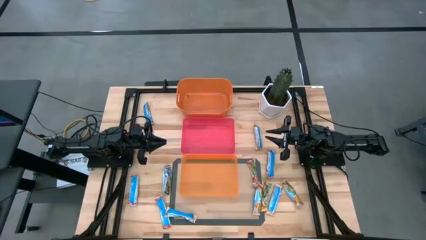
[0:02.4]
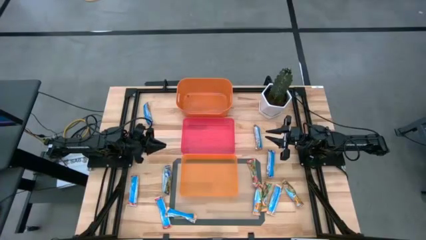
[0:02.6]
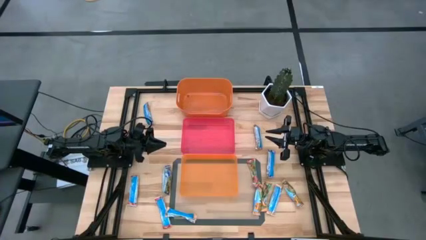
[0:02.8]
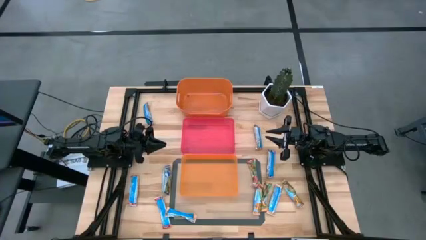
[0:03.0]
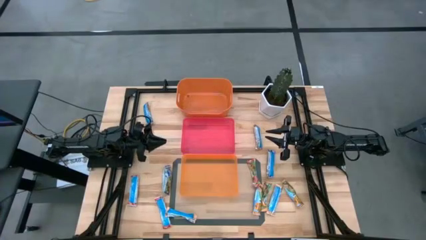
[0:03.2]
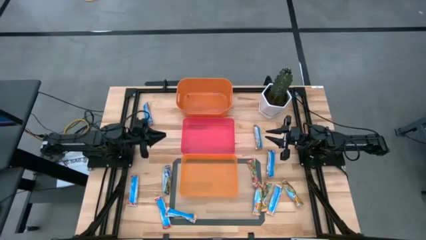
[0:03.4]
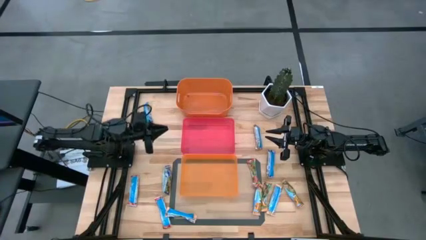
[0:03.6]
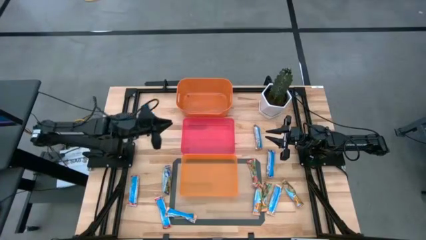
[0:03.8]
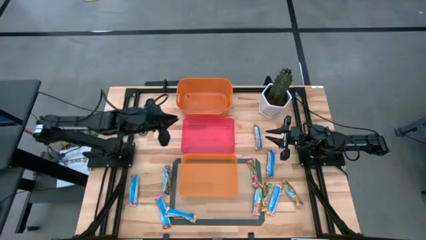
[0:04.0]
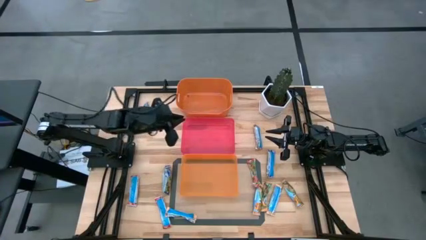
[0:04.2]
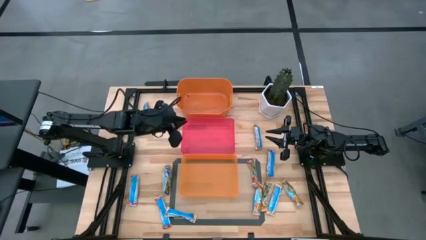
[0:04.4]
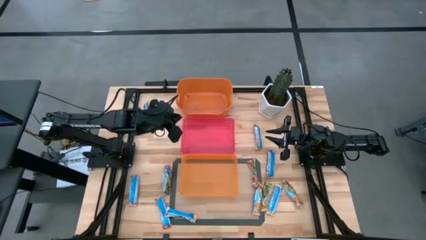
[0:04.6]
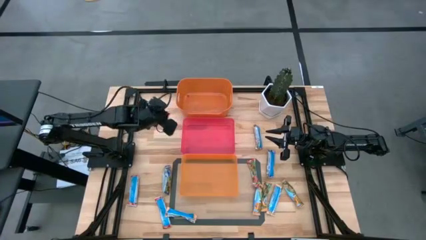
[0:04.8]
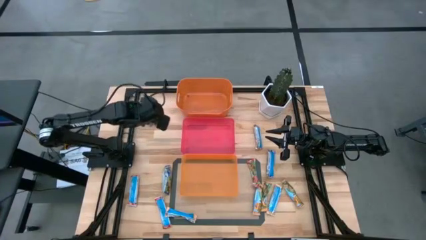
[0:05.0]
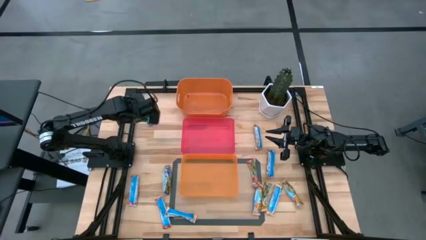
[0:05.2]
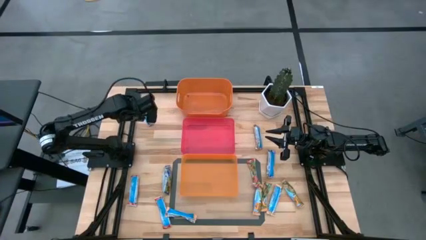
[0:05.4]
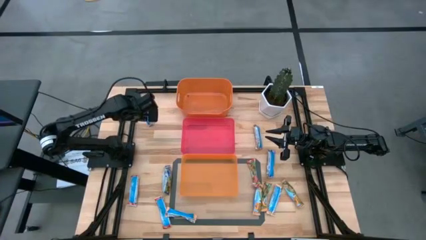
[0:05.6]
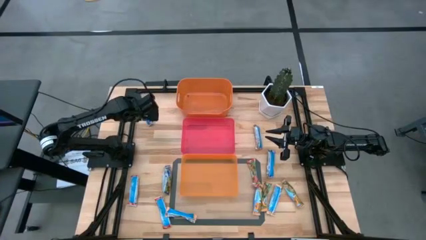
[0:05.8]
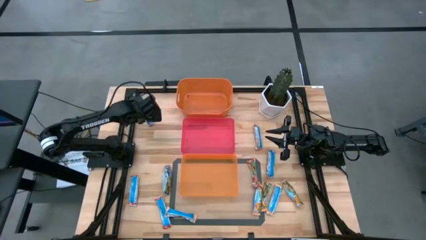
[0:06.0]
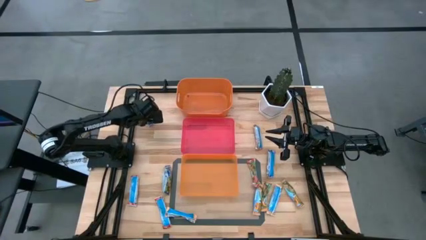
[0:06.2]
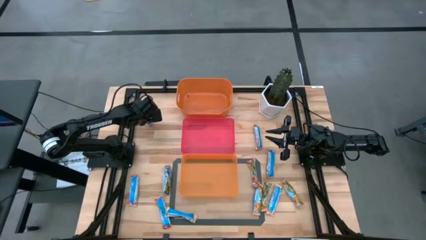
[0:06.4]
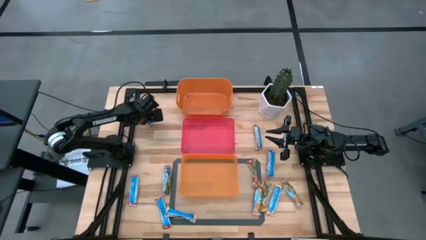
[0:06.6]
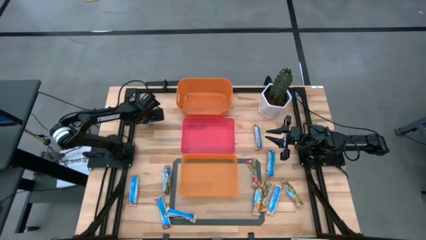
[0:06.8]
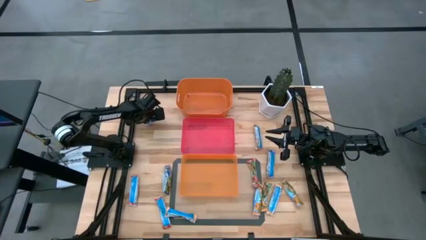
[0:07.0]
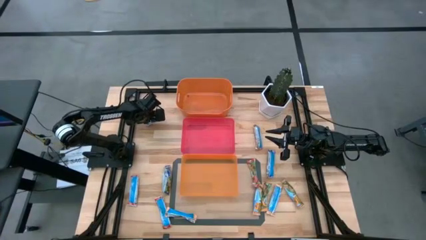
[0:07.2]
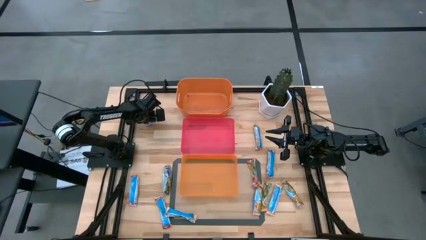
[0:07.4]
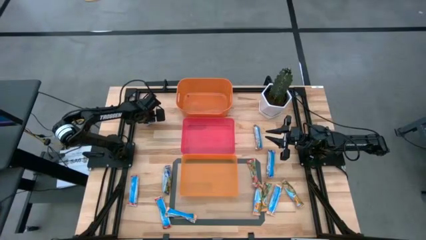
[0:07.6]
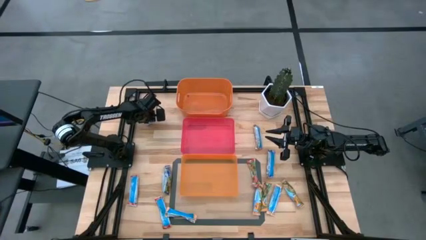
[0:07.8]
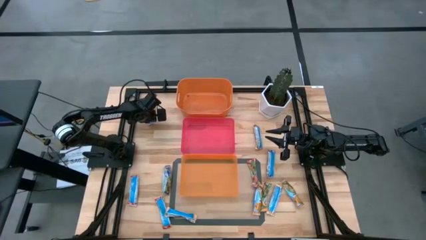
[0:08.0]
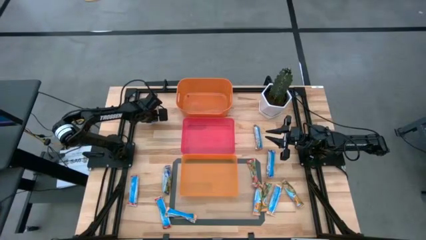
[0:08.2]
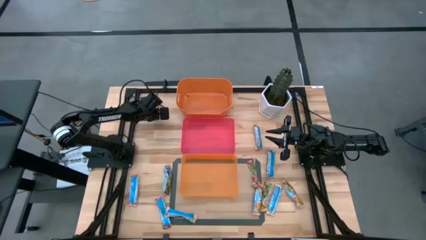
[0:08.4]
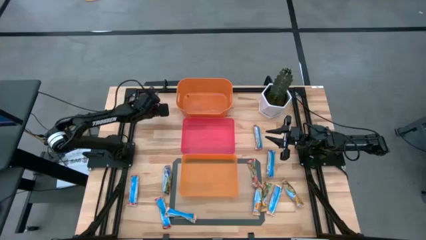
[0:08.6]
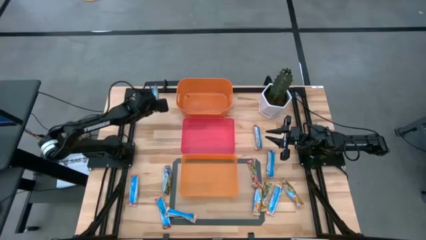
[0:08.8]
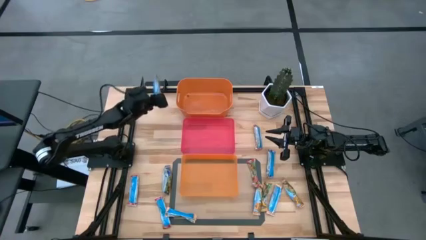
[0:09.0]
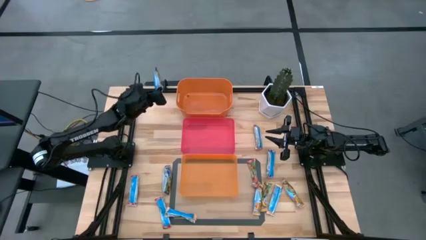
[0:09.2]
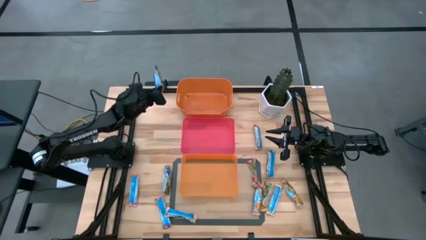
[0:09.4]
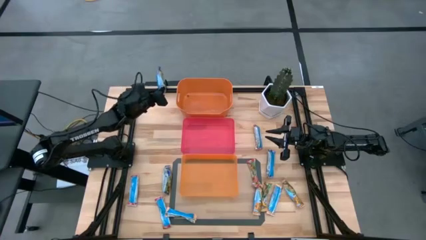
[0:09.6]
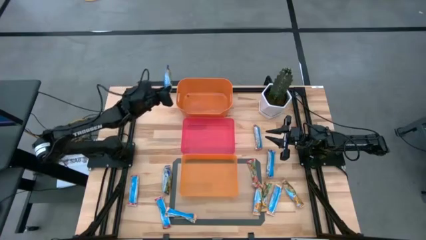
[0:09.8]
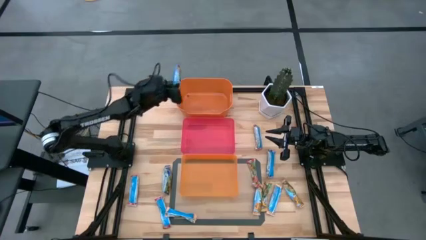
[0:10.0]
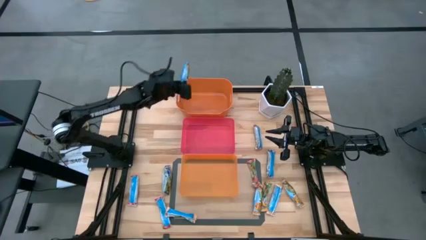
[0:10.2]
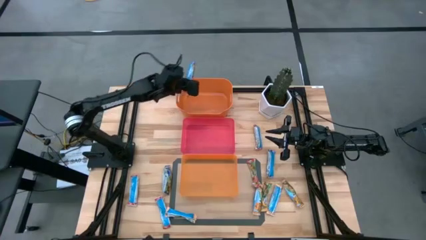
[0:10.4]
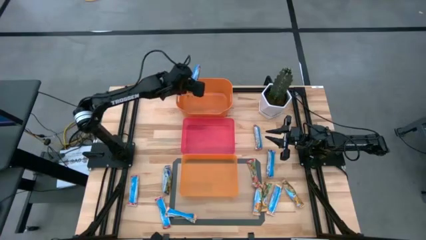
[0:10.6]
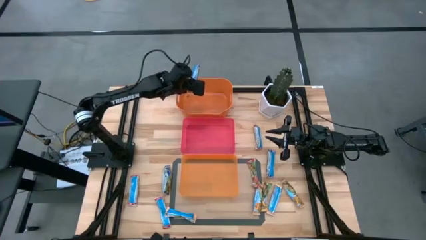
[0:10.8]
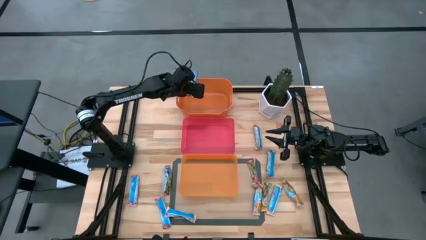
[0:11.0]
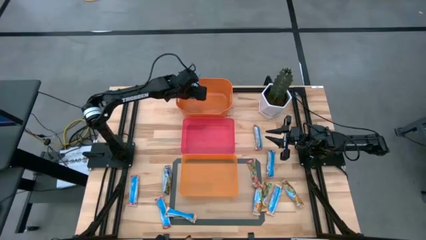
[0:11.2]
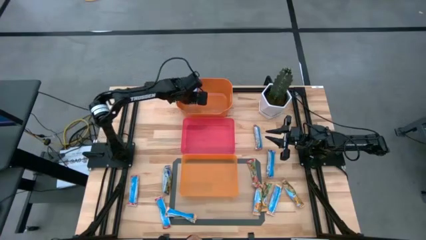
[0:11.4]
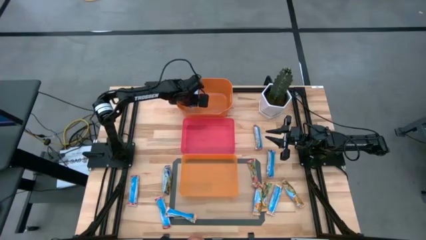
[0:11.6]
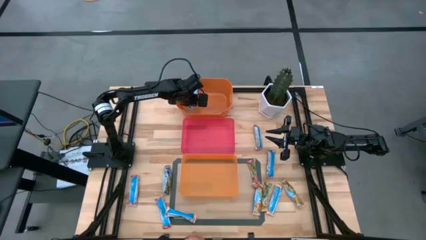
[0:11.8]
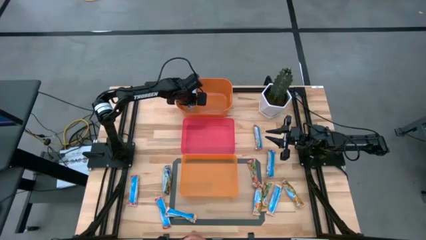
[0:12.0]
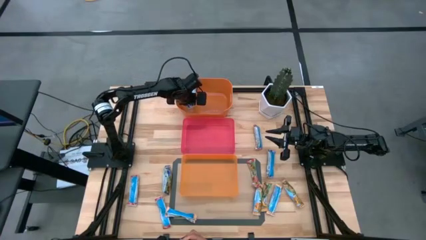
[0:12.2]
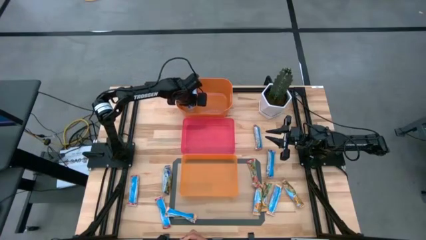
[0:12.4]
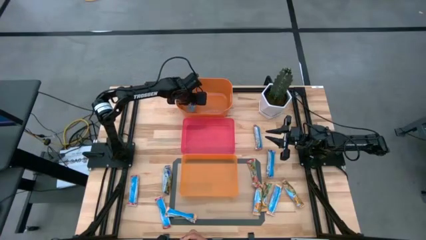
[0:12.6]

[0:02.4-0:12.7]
Task: Pick and place Granola Bars by type
Put the blue granola bar into the top orange bin

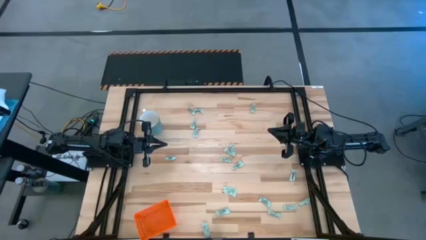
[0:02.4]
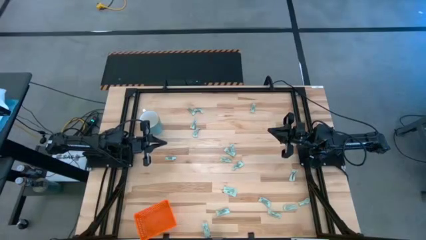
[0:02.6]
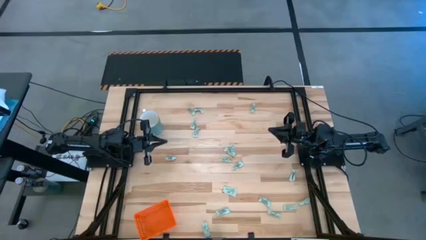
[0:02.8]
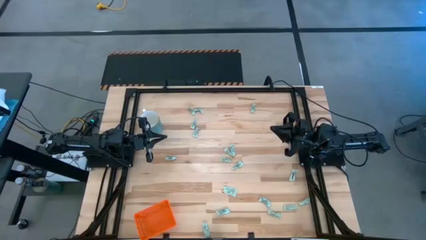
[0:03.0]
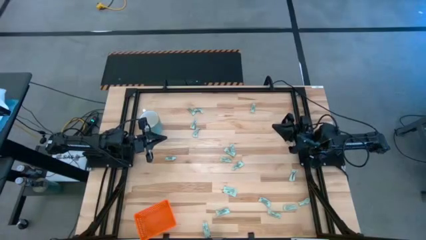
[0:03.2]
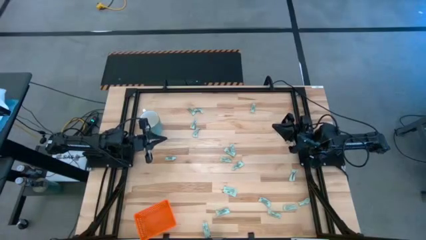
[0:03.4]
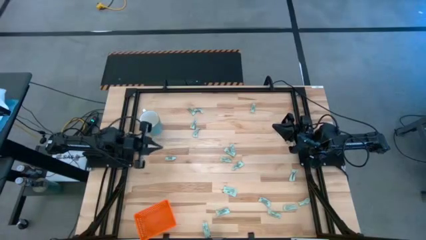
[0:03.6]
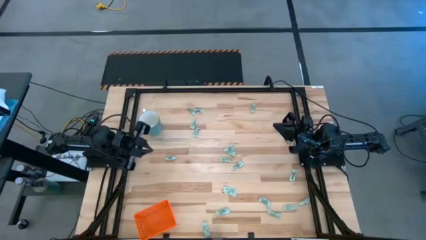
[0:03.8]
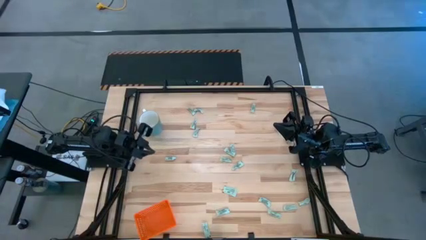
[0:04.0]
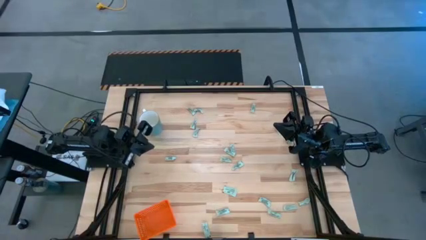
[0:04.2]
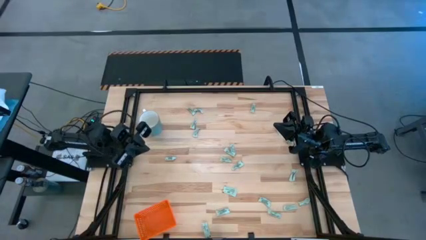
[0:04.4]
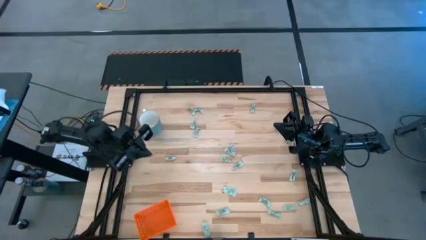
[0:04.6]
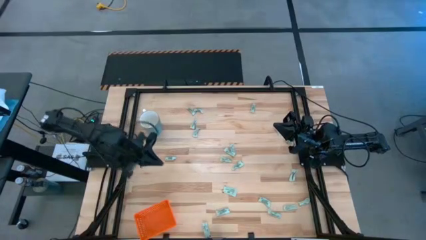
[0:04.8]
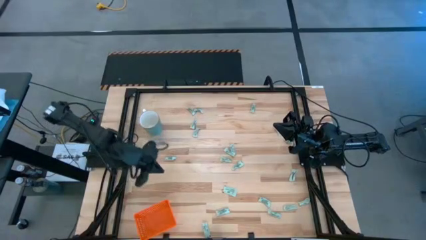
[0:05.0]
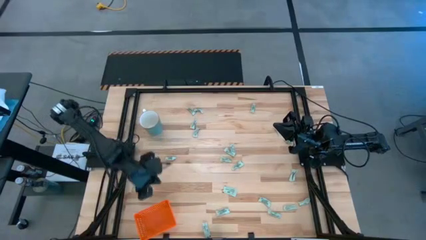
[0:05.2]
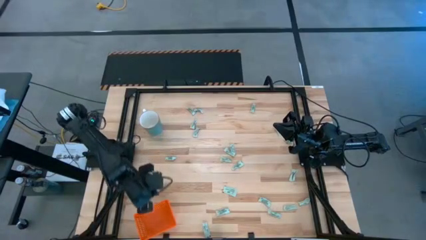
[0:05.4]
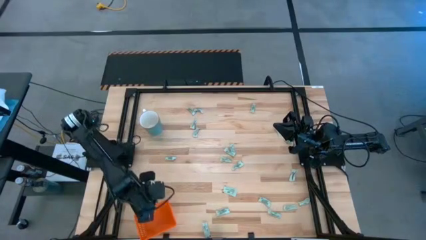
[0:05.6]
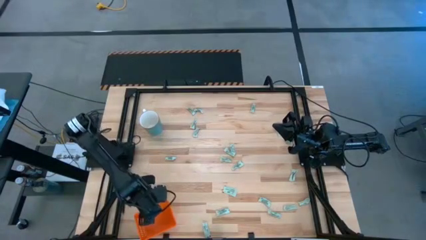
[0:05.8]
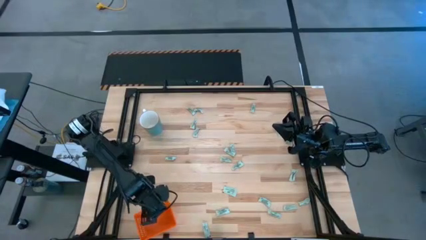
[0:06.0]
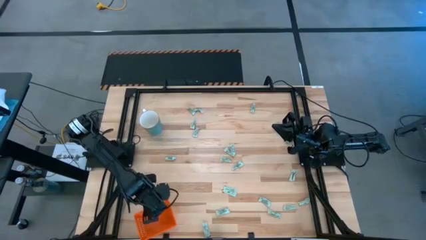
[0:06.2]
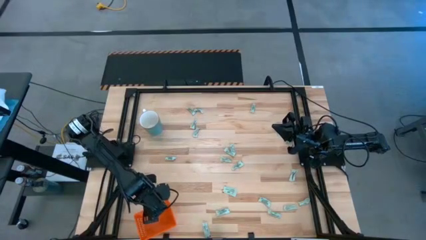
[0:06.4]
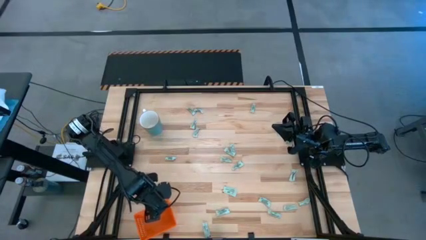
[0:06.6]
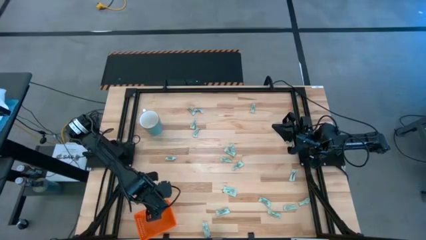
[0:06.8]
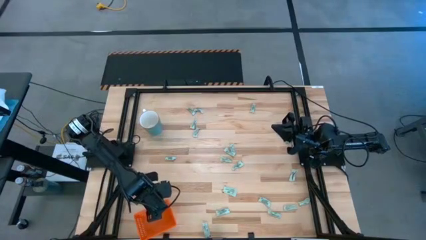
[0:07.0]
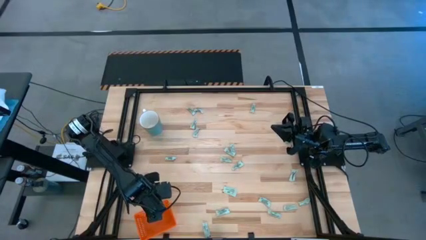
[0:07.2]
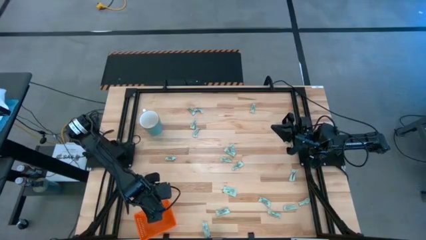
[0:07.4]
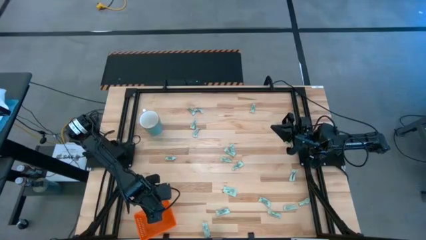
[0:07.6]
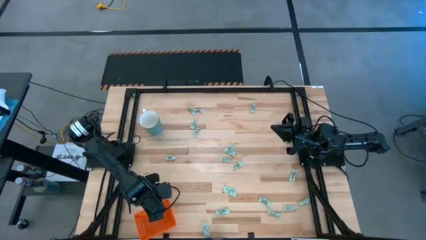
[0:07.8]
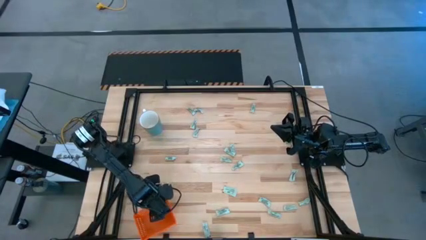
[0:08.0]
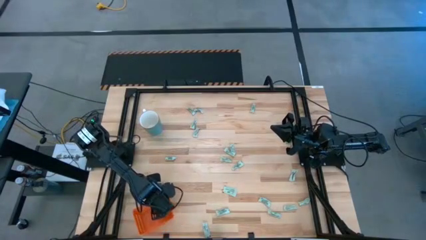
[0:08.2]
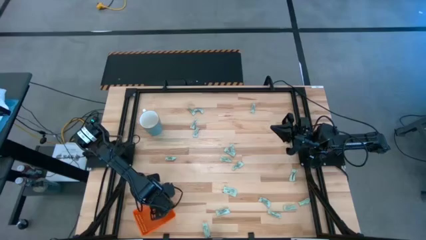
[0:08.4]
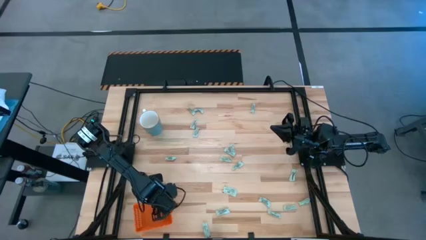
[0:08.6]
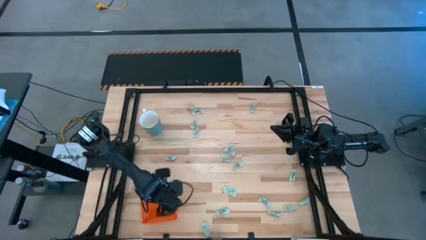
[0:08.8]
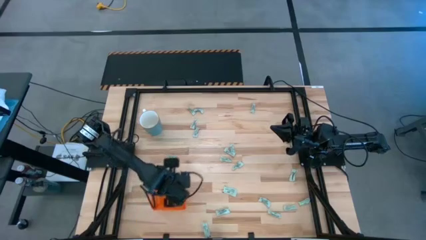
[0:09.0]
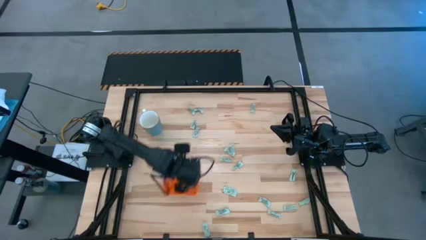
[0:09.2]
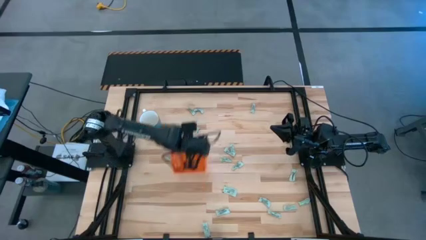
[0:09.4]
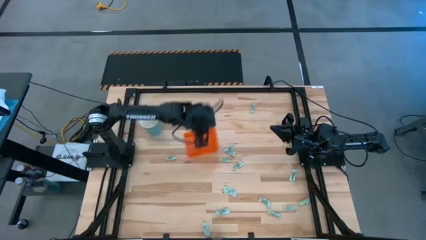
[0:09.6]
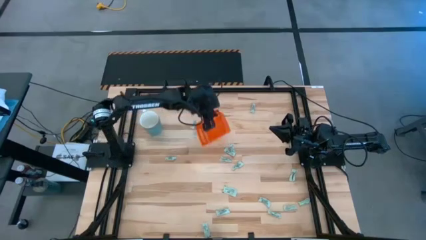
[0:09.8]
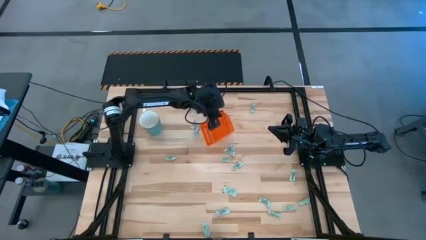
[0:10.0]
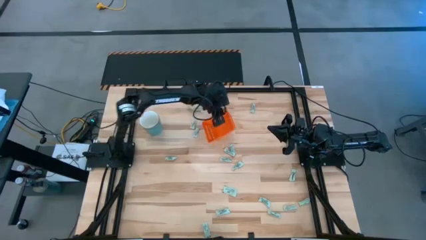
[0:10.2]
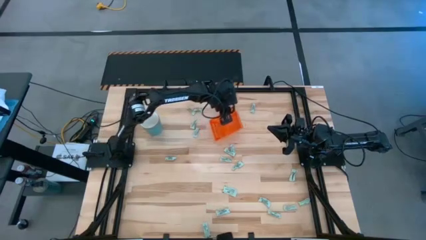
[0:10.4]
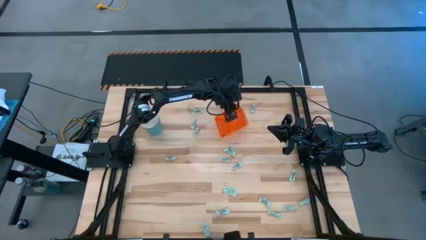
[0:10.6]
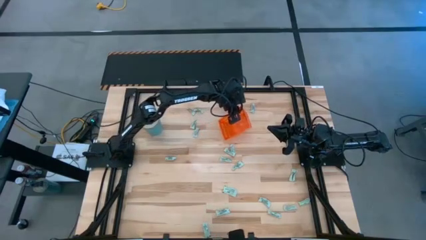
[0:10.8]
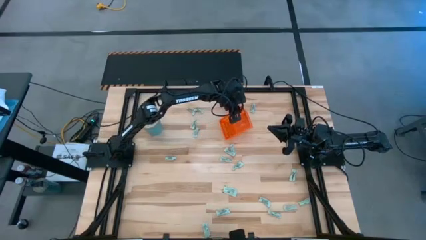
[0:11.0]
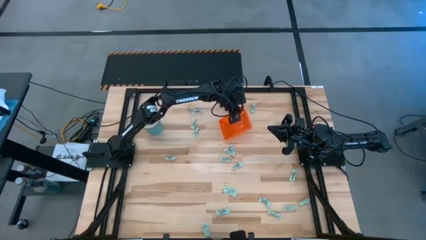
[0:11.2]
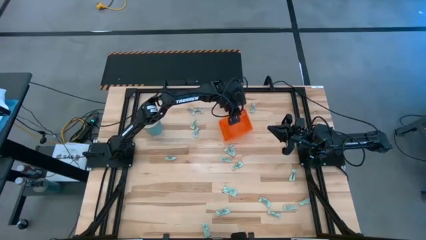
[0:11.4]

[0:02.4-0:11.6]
Task: Pick and place Stevia / Truvia into bins
Move the bin to the top center of the table
